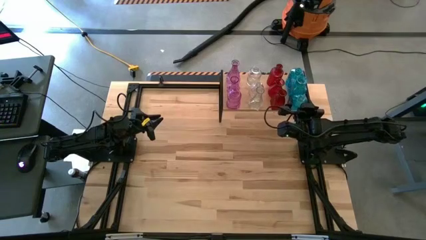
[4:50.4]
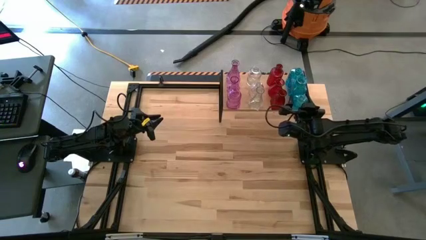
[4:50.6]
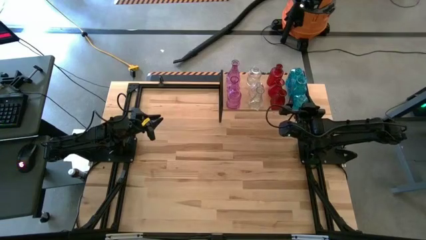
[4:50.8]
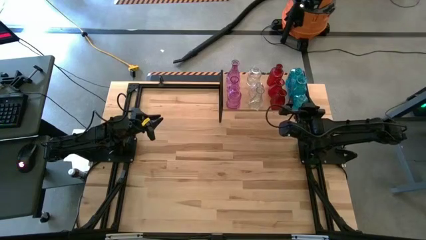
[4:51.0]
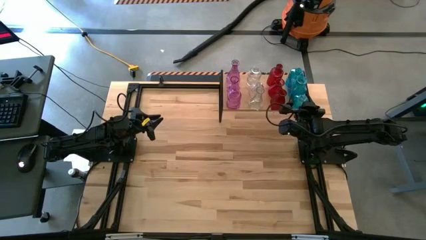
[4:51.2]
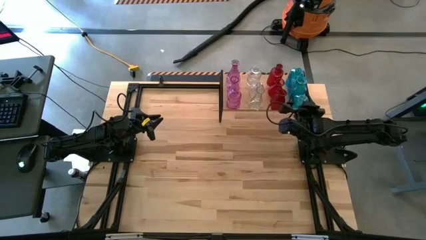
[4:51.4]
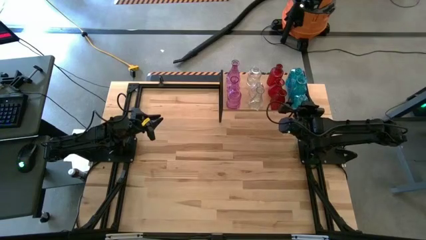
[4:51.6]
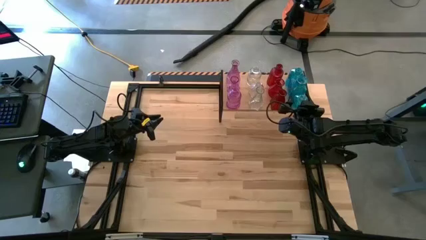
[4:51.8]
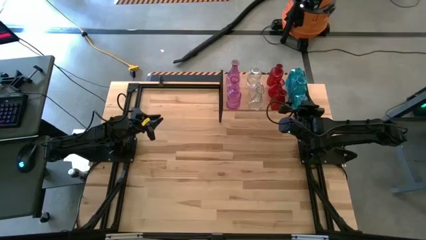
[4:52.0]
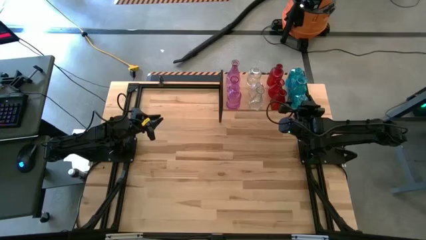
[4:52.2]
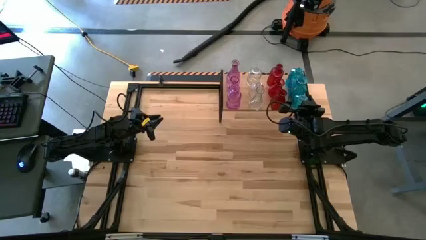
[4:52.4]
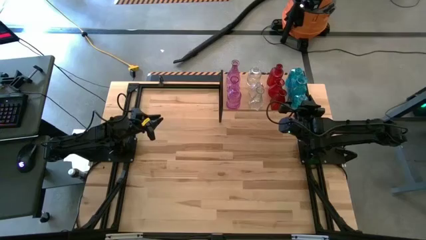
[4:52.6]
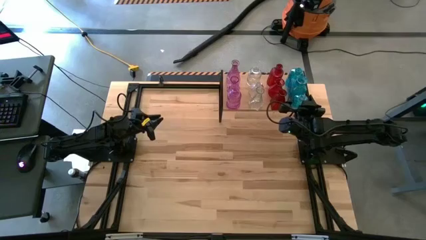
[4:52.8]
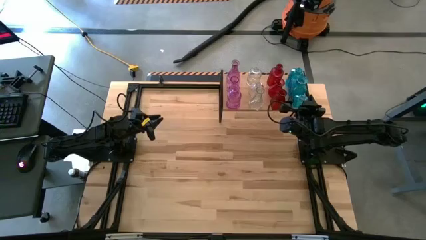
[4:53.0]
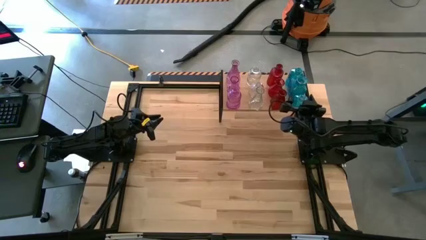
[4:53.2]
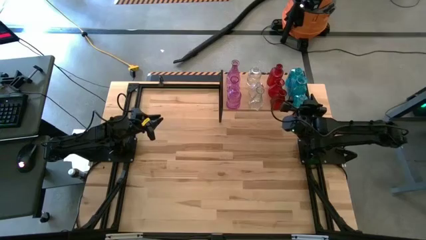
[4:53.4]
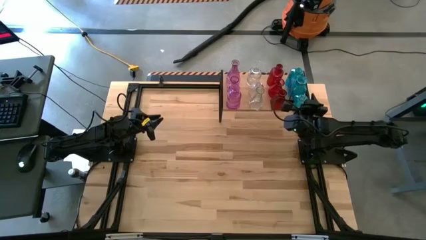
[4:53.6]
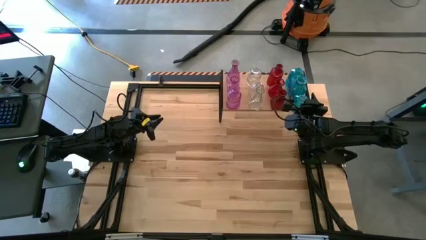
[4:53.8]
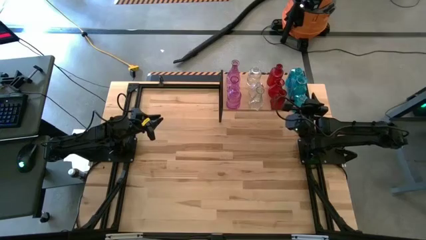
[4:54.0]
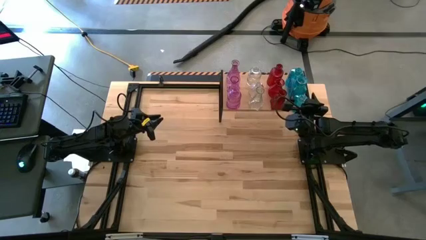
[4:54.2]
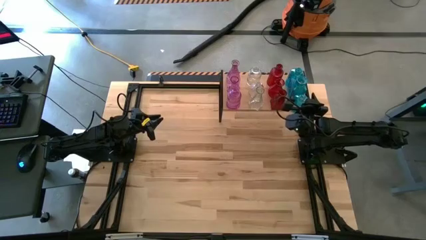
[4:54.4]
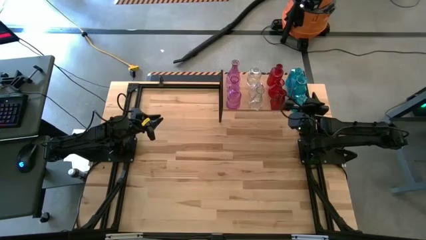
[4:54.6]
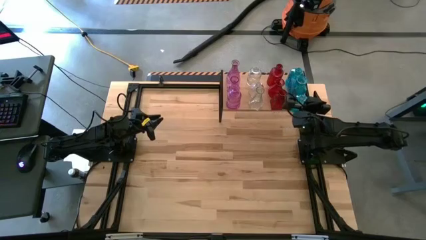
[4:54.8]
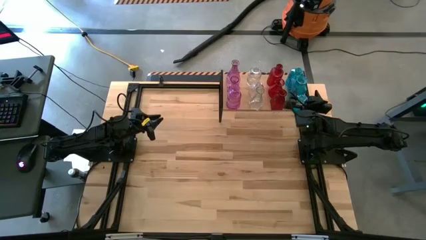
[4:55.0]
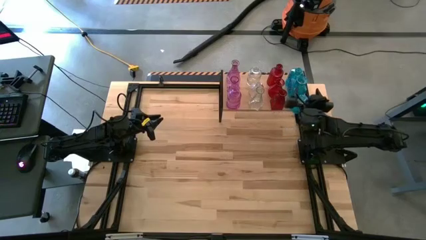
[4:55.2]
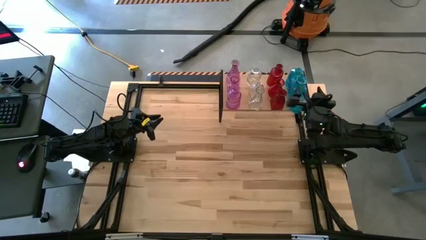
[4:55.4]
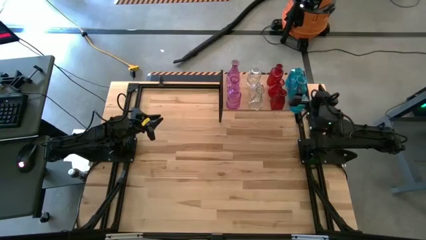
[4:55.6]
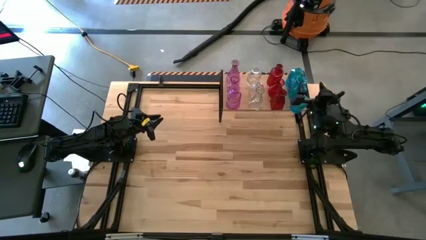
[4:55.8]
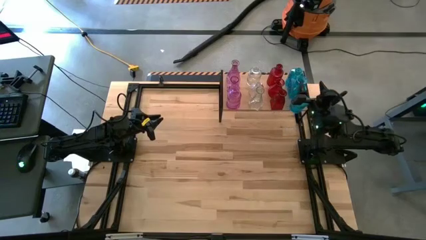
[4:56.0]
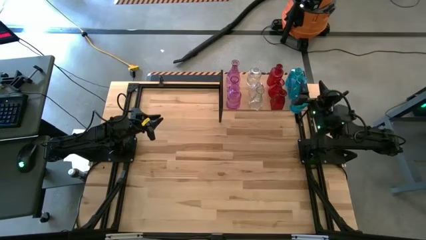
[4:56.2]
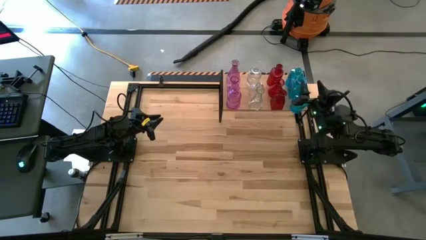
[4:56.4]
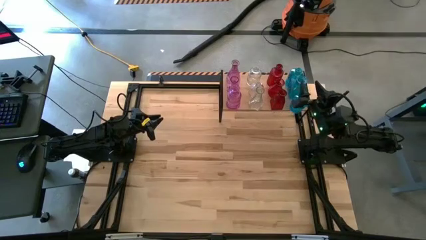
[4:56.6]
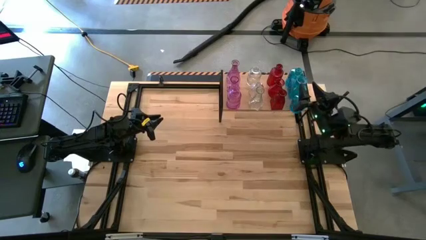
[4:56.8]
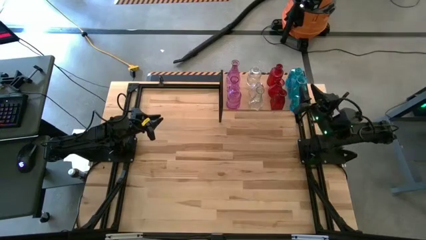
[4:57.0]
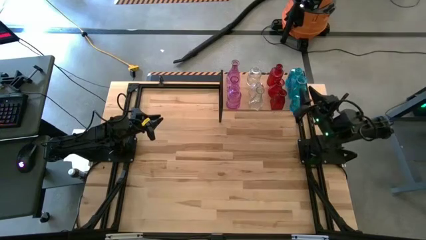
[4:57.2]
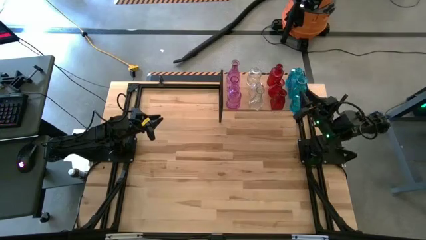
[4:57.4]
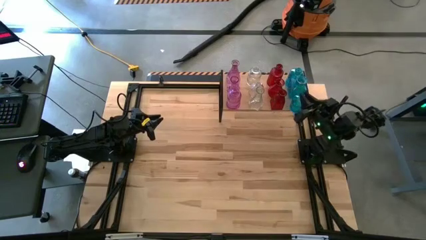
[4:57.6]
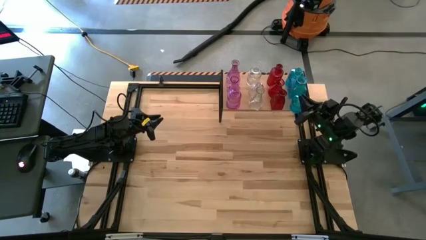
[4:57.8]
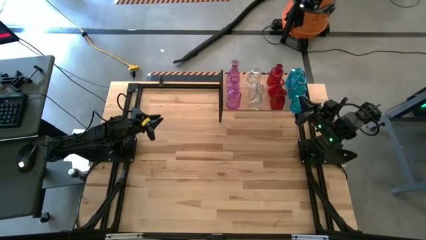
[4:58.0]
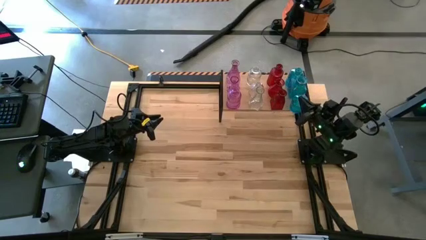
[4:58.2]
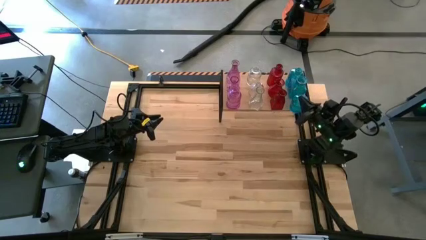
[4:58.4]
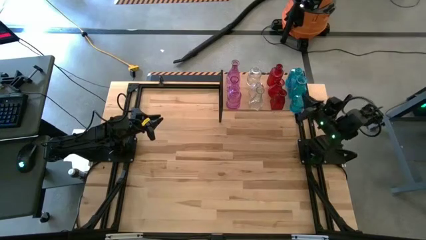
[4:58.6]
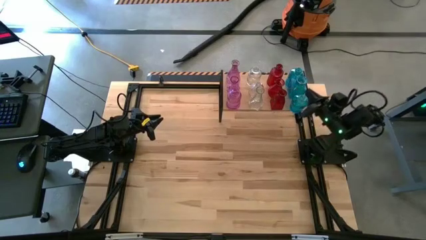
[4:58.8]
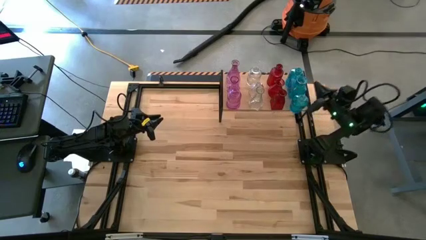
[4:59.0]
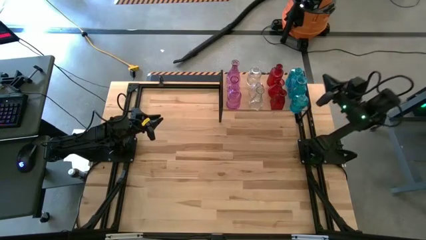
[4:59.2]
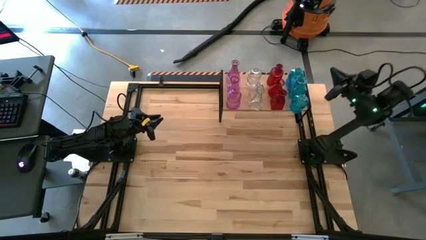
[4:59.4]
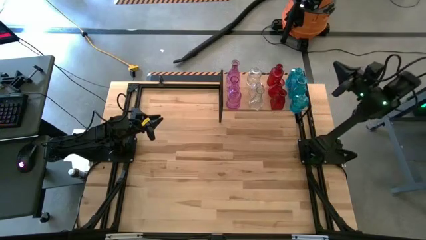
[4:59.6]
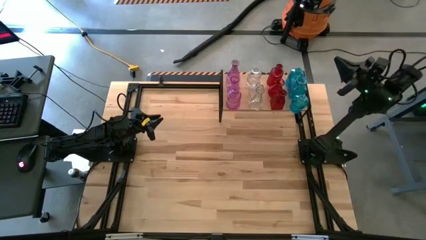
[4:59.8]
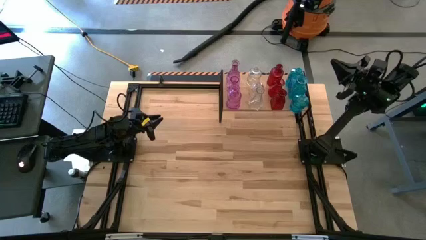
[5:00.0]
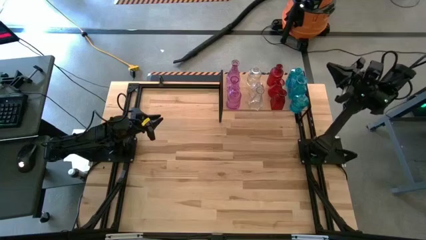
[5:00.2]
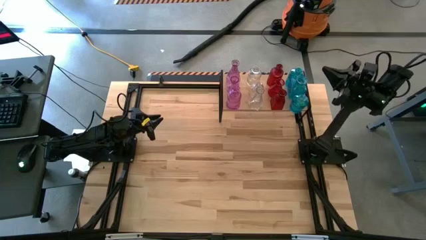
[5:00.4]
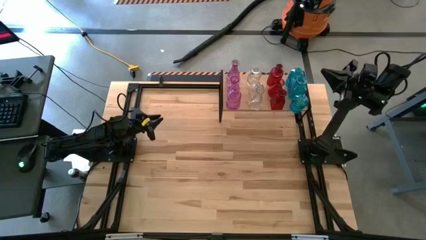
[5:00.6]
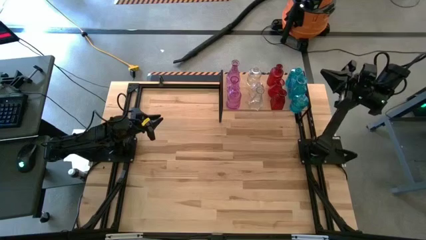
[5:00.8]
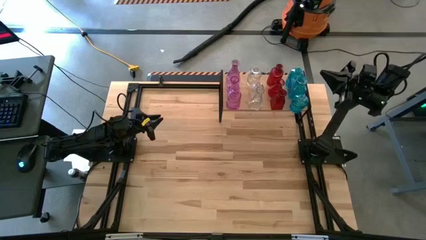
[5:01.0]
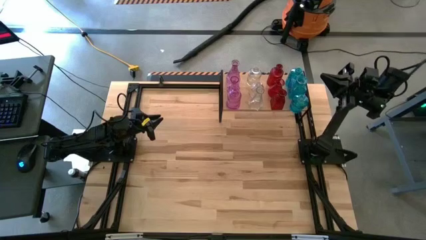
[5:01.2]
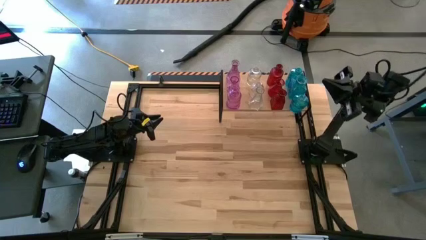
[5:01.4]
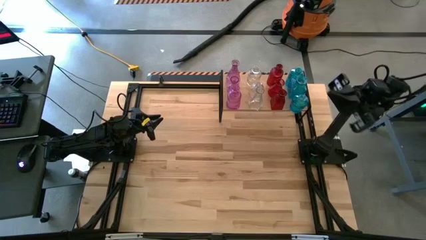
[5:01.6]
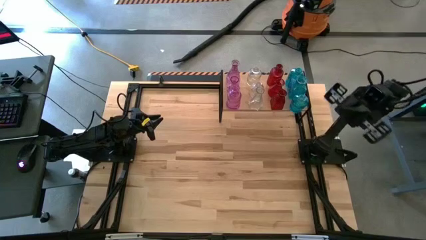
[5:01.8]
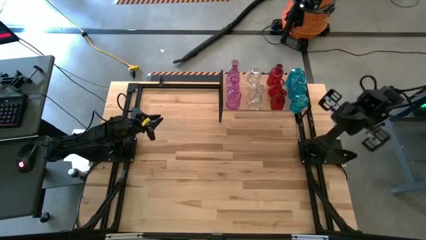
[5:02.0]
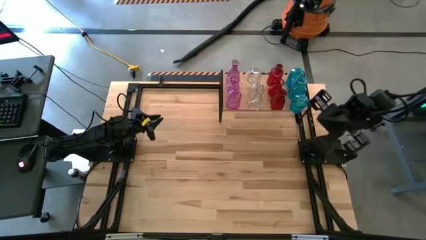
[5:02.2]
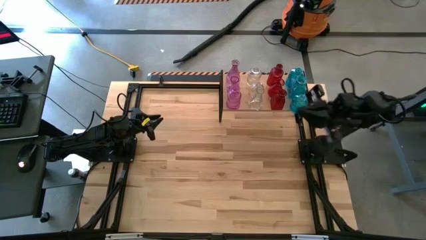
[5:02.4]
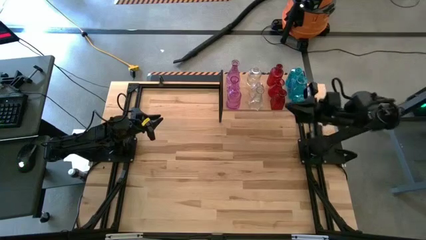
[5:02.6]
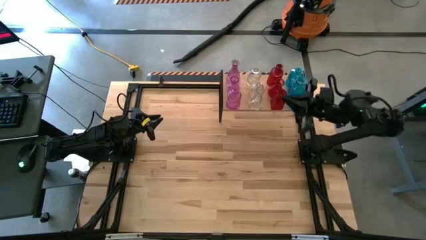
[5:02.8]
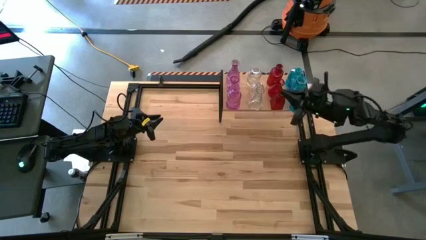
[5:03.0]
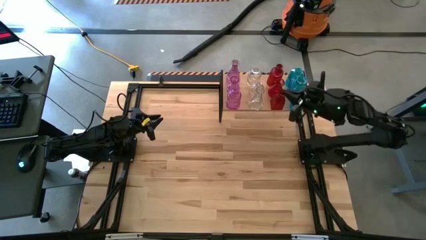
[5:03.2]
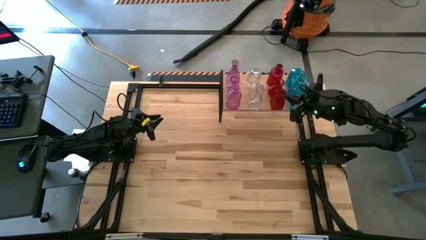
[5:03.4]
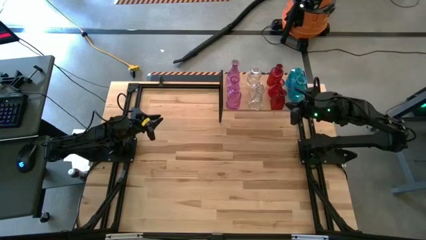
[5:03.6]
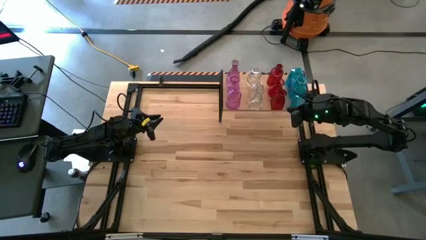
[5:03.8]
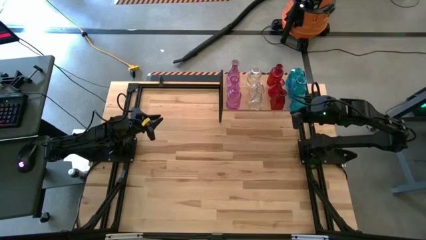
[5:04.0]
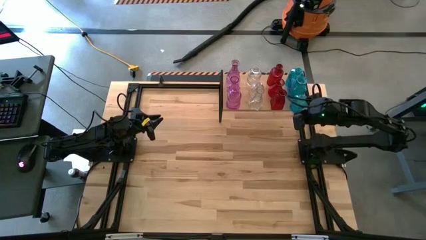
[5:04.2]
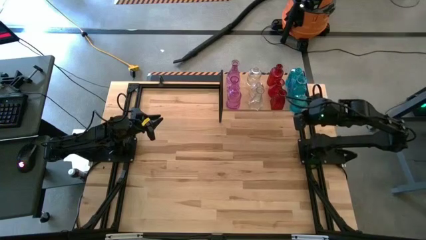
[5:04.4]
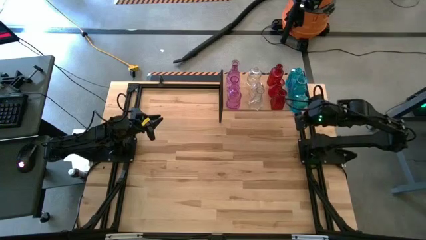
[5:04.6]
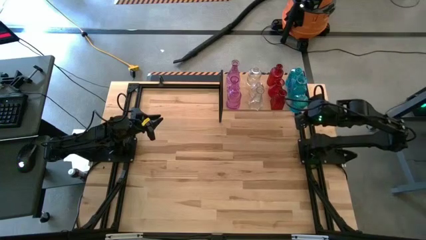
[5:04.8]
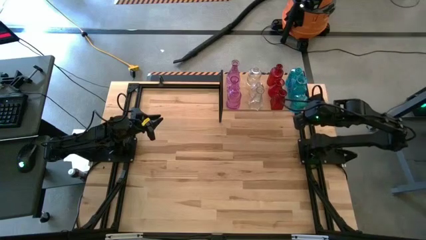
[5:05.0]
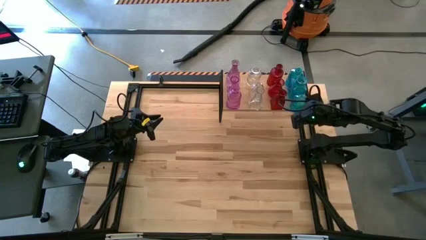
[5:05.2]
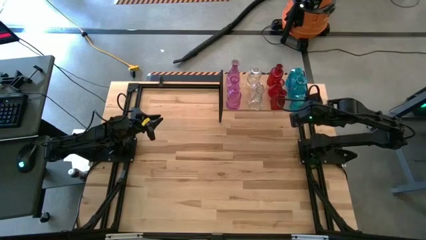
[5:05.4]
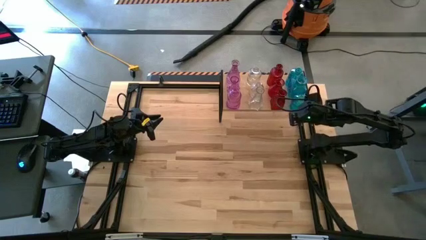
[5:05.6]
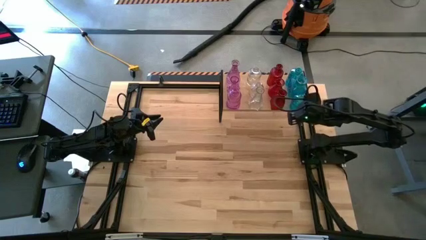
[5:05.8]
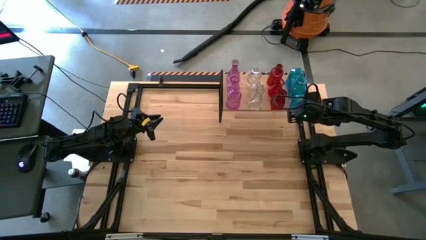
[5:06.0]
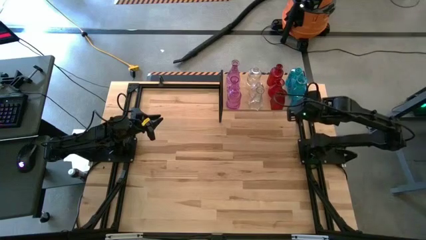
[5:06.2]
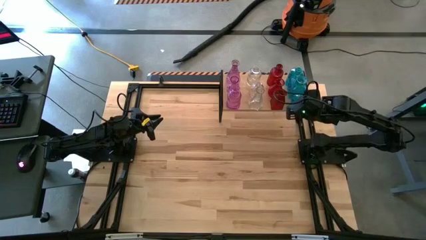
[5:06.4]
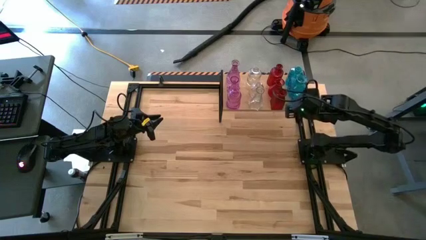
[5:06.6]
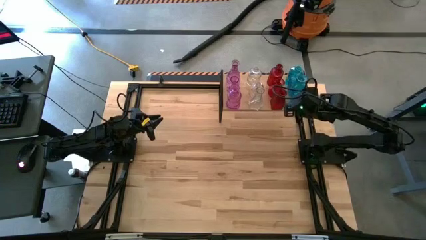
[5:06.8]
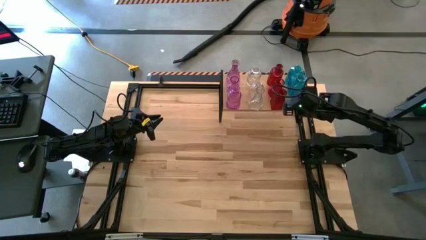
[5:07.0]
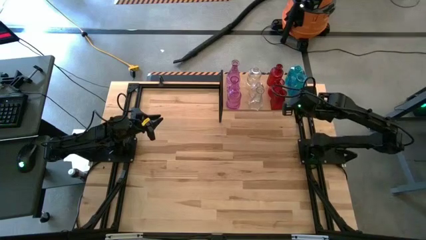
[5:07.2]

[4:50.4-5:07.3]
Task: sort vases onto shelf
Put the blue vase on the shelf aligned with the other blue vase
